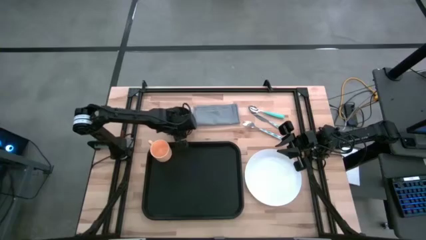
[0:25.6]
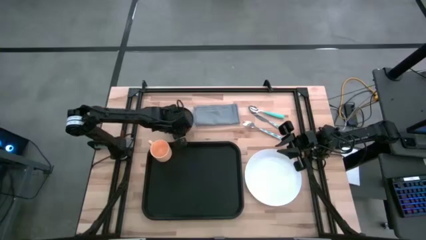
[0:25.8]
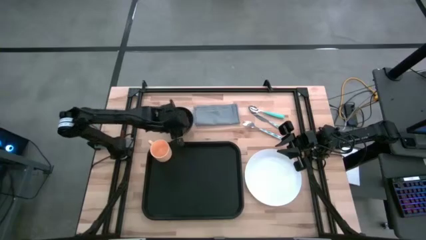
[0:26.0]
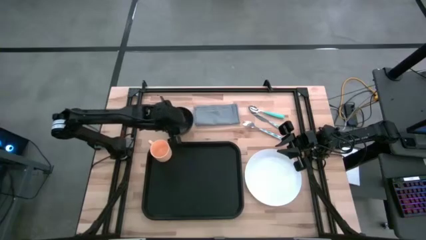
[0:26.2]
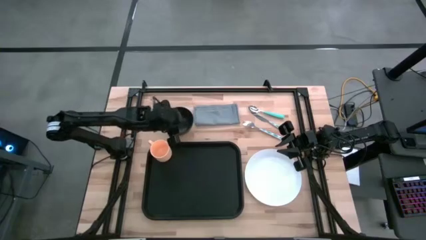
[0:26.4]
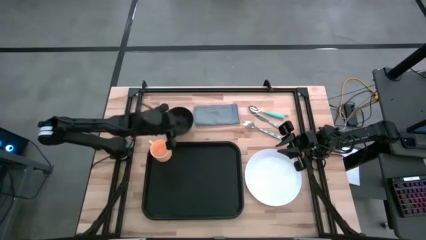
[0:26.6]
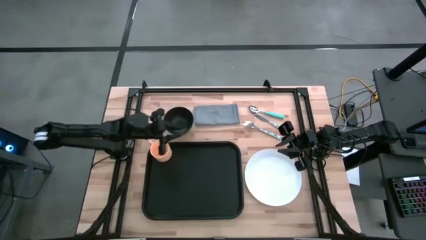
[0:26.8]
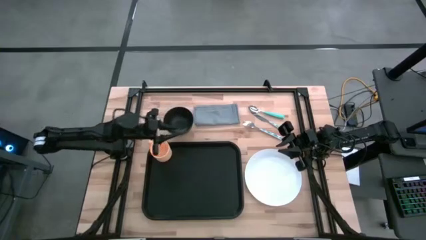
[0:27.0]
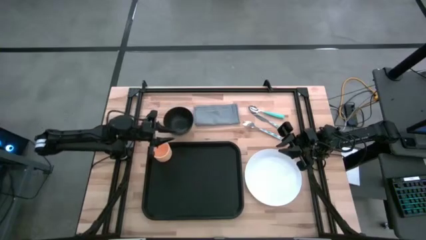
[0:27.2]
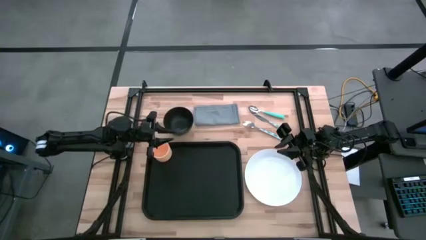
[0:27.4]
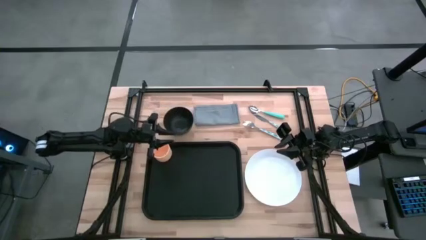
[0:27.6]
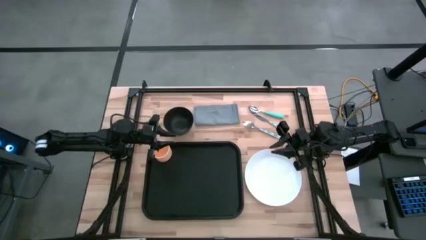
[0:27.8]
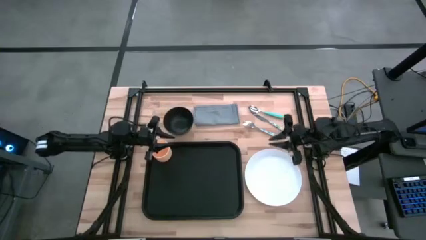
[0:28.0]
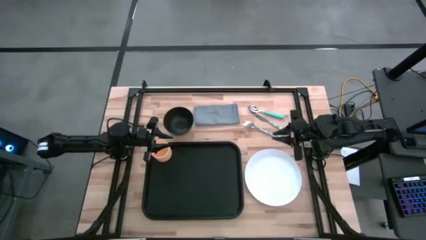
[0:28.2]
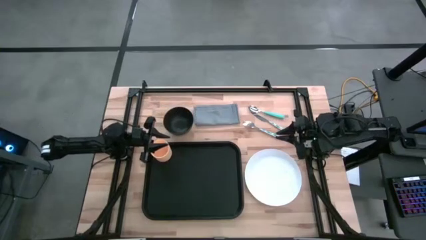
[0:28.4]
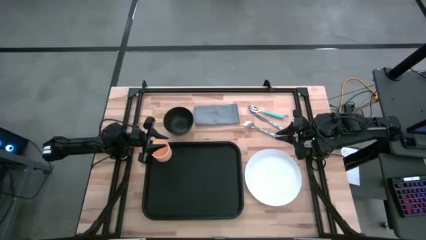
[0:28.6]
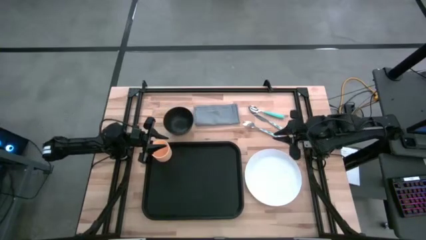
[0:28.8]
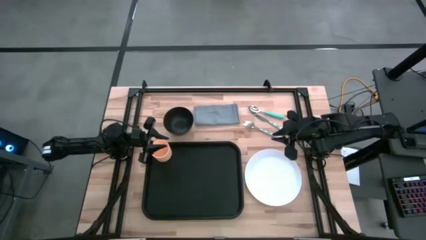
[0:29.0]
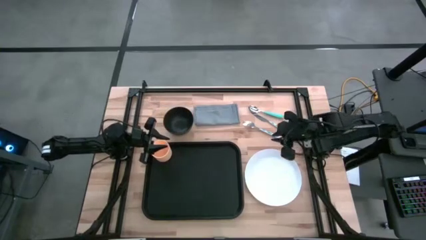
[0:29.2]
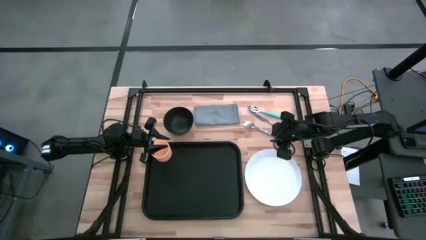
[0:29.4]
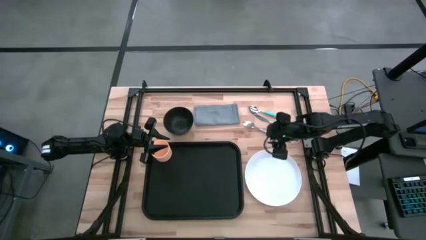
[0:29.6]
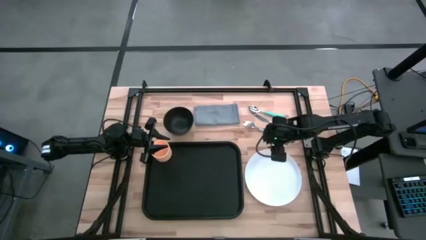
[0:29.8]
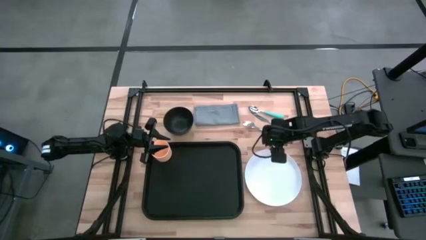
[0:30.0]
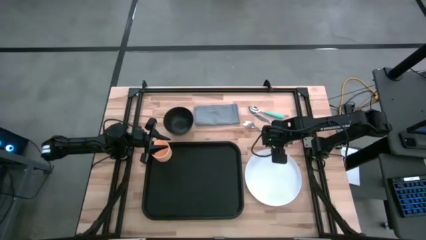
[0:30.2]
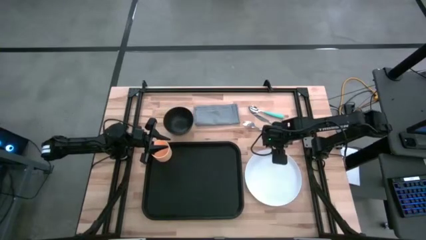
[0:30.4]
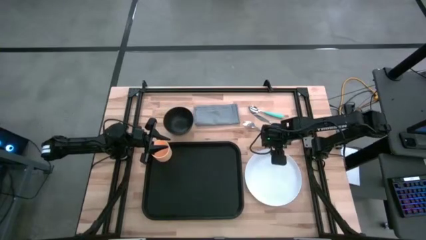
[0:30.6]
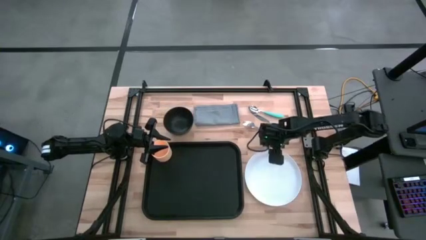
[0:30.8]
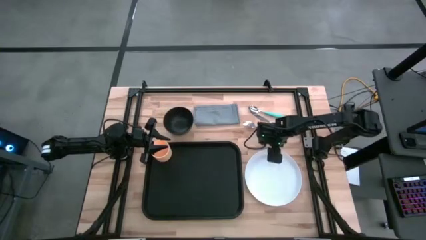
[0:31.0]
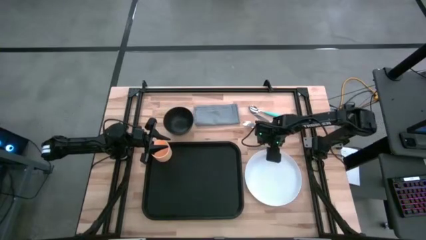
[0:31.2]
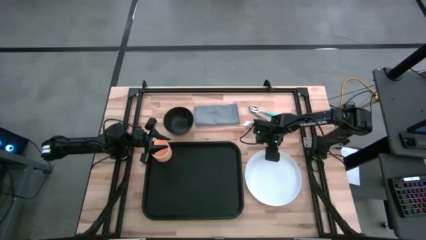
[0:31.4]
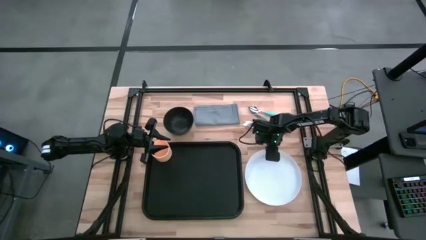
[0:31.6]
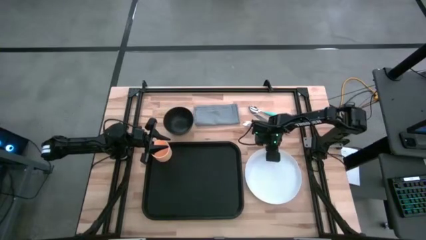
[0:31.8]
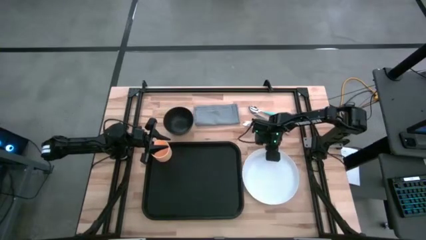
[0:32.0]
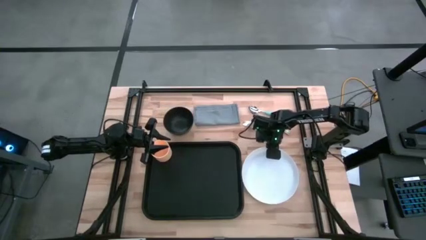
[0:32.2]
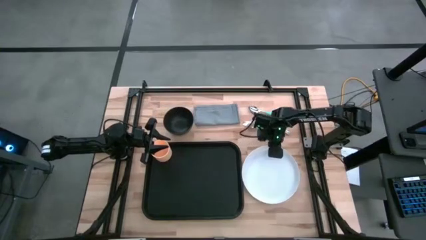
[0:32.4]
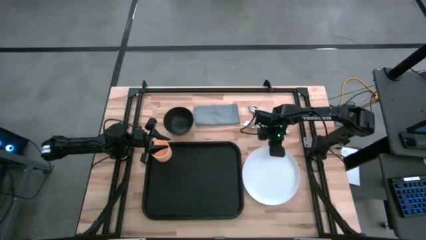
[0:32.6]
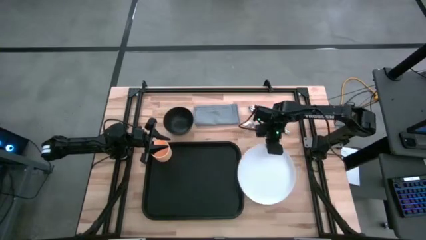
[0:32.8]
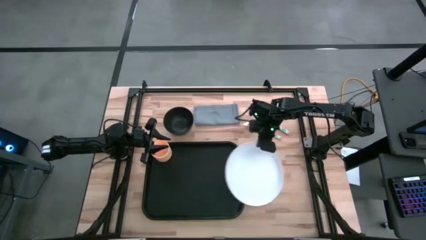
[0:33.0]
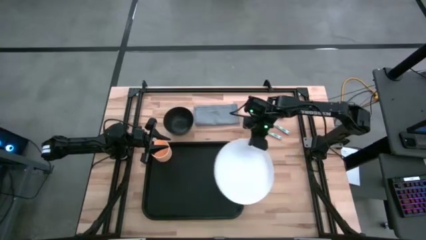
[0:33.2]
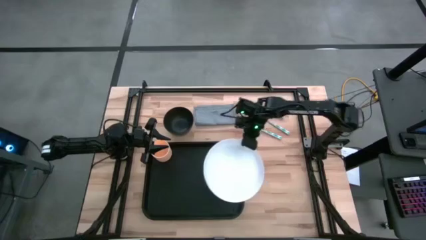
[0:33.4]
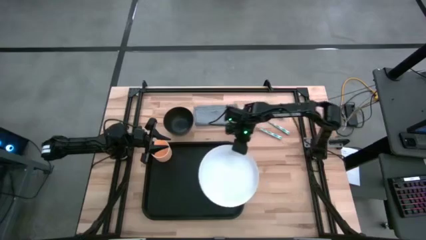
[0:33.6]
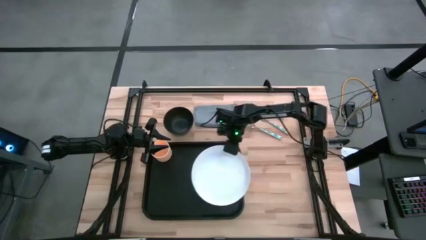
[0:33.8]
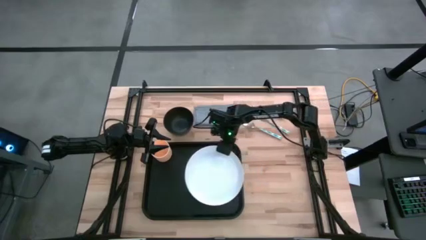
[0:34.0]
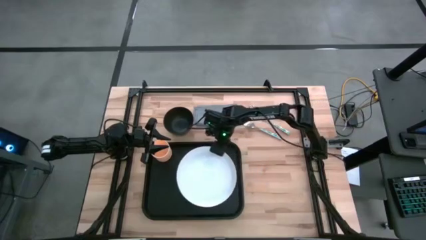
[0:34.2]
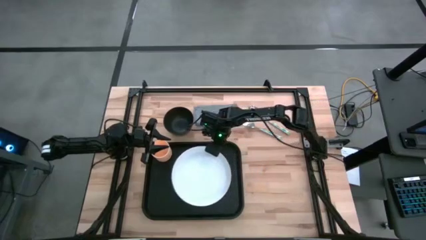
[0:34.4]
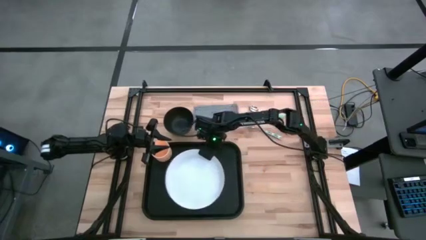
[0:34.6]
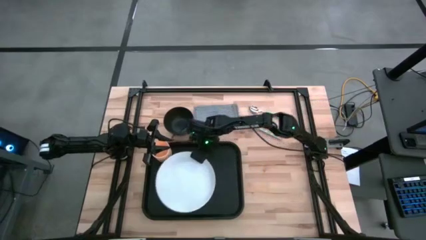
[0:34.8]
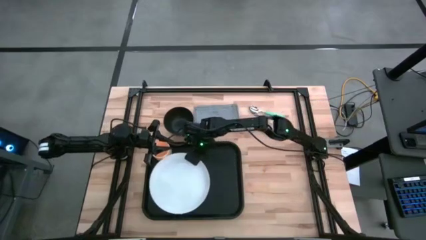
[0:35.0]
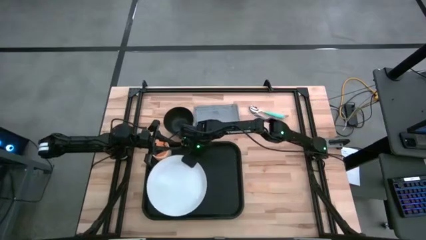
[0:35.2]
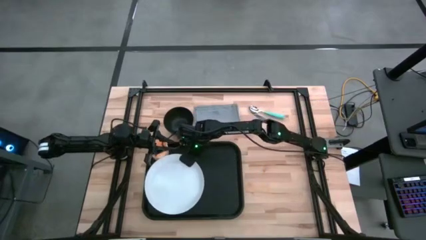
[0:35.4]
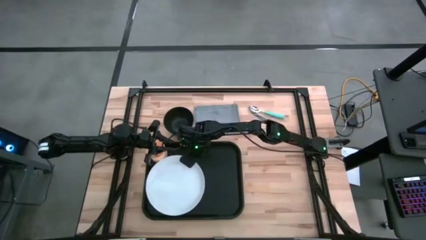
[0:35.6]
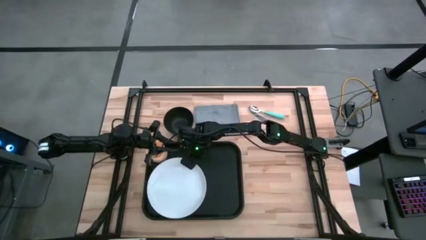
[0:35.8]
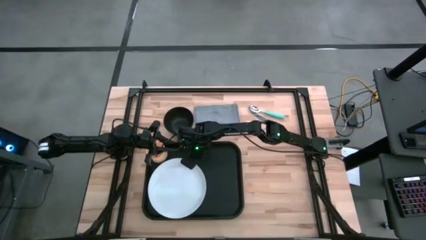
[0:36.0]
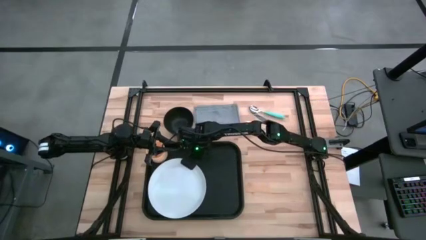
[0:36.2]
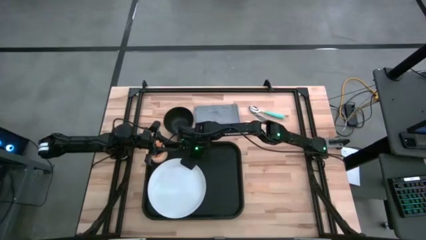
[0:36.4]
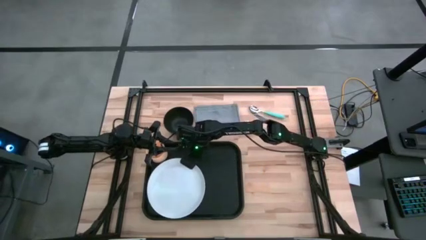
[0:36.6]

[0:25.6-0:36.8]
Task: Set up tray
Put the white plate on the black tray to the bottom right of the light orange mug
